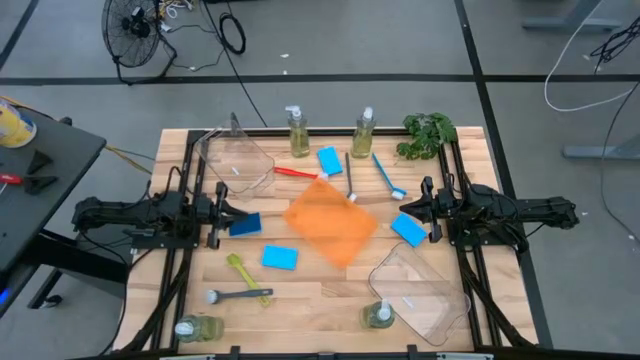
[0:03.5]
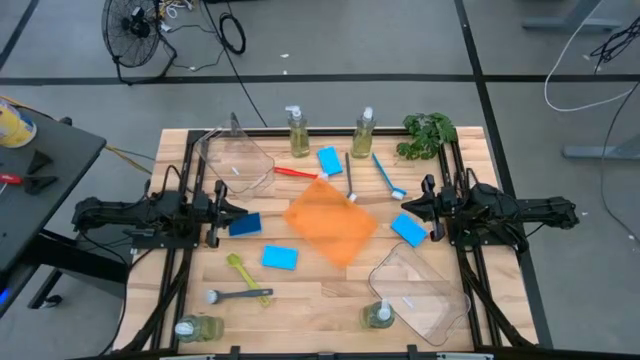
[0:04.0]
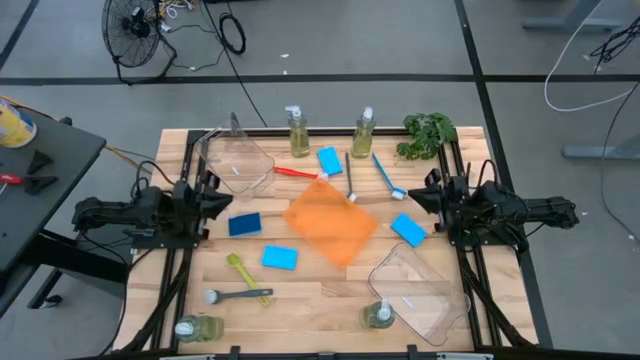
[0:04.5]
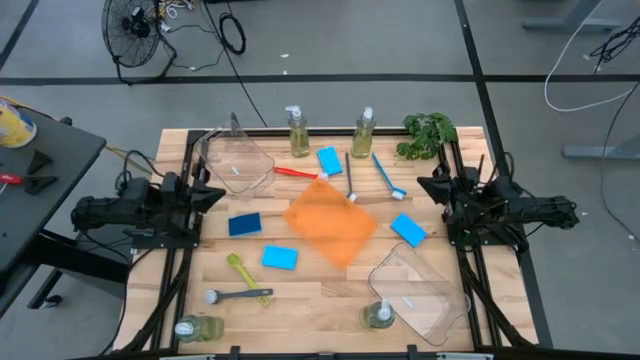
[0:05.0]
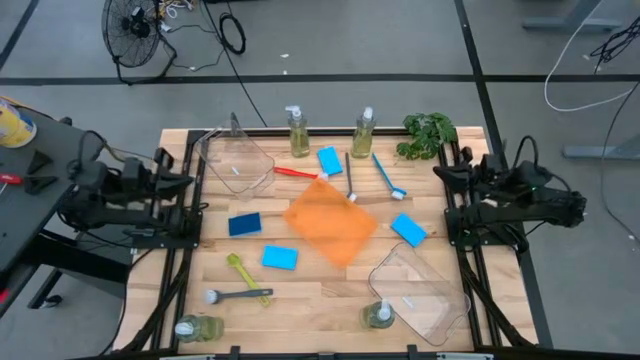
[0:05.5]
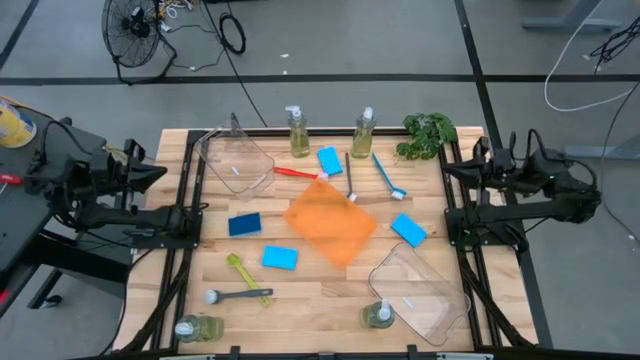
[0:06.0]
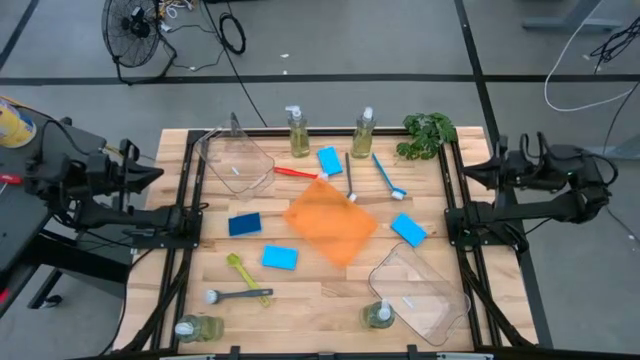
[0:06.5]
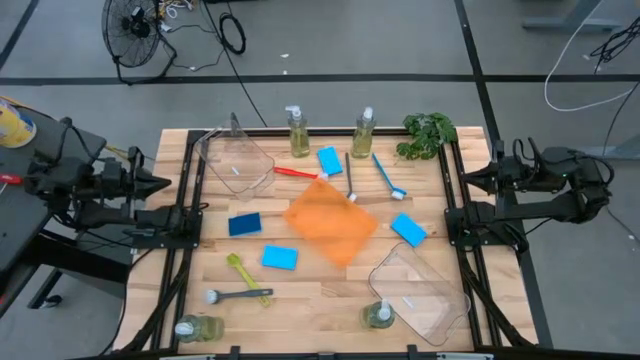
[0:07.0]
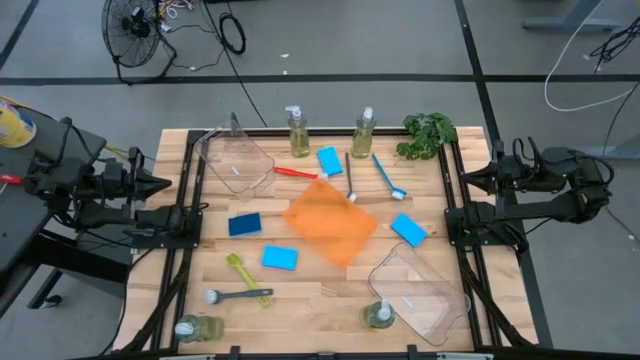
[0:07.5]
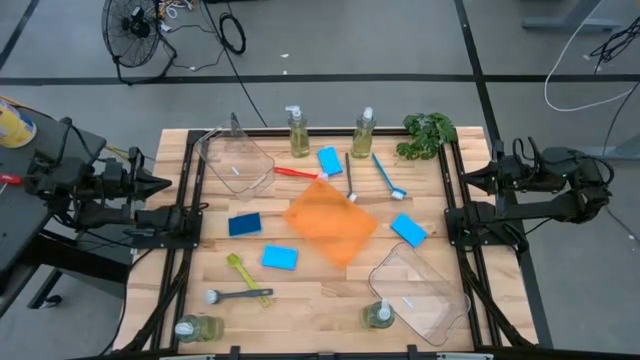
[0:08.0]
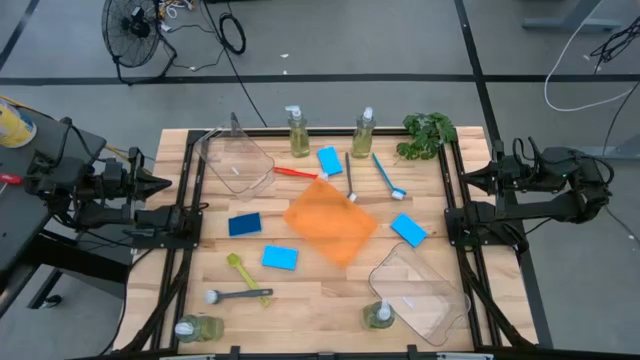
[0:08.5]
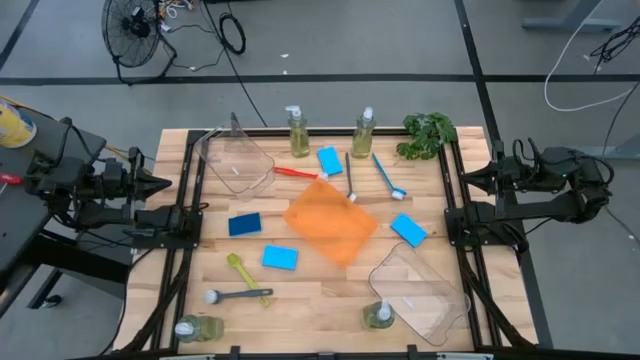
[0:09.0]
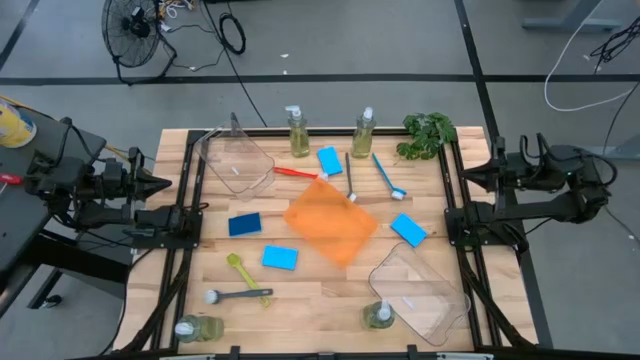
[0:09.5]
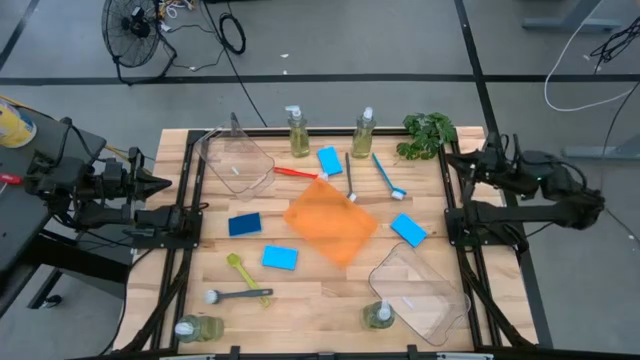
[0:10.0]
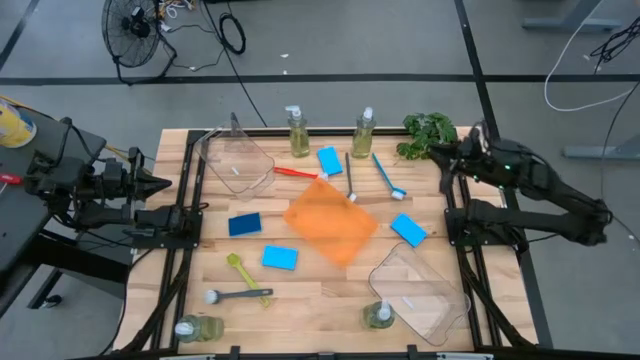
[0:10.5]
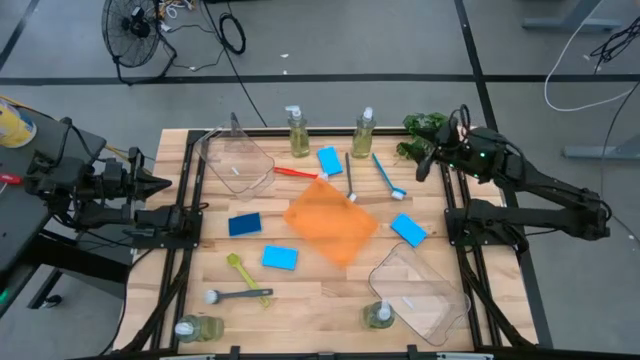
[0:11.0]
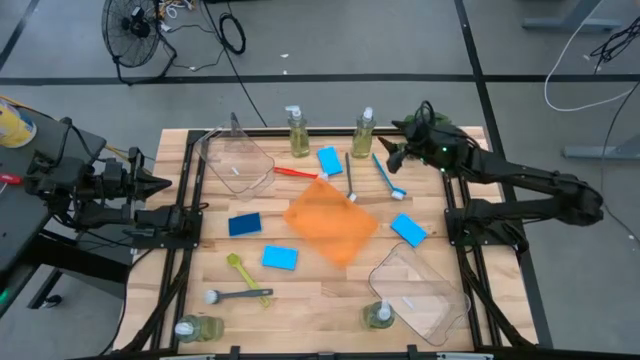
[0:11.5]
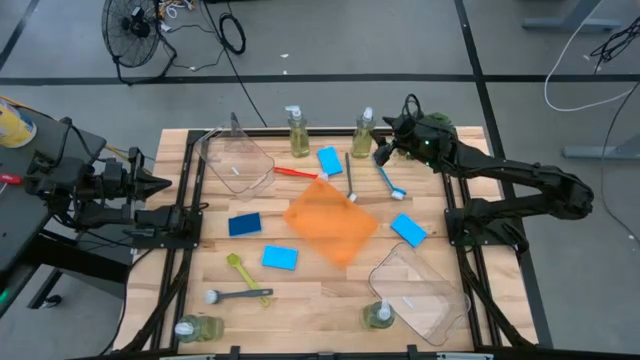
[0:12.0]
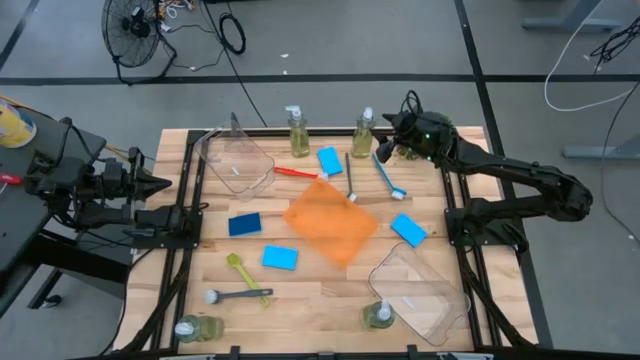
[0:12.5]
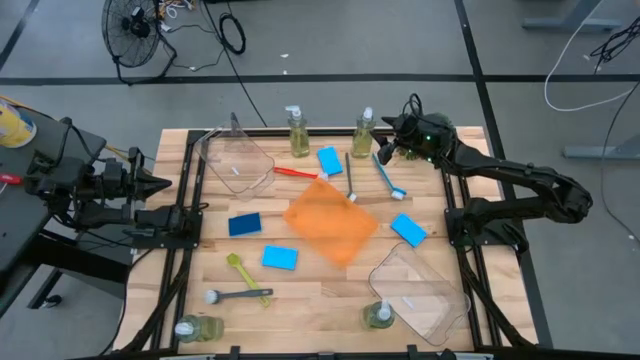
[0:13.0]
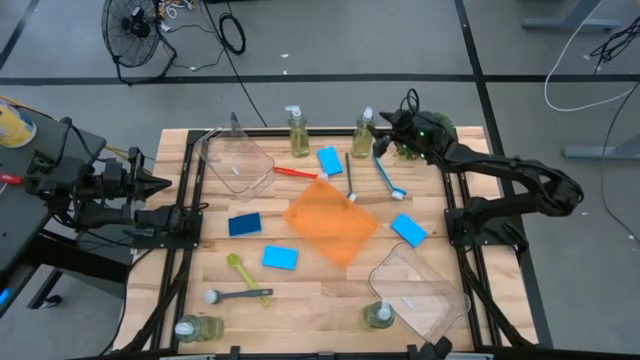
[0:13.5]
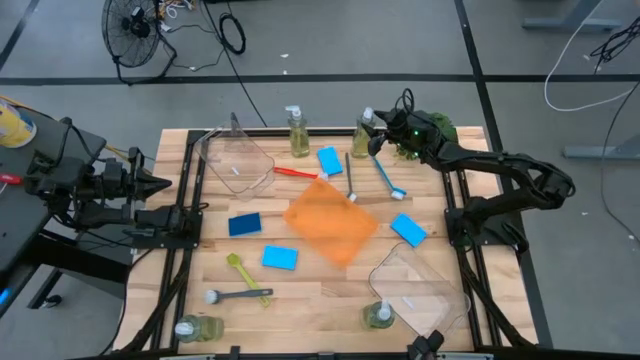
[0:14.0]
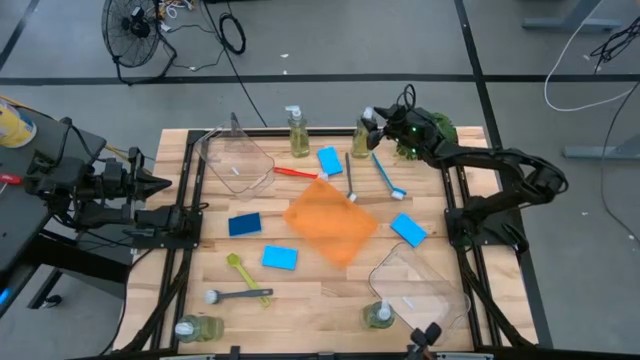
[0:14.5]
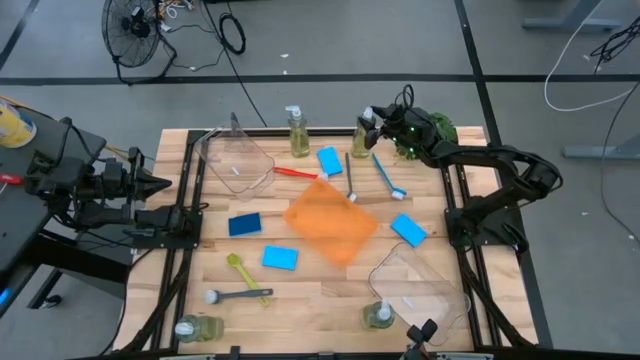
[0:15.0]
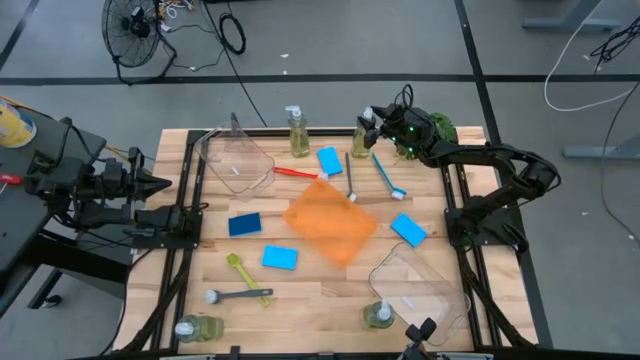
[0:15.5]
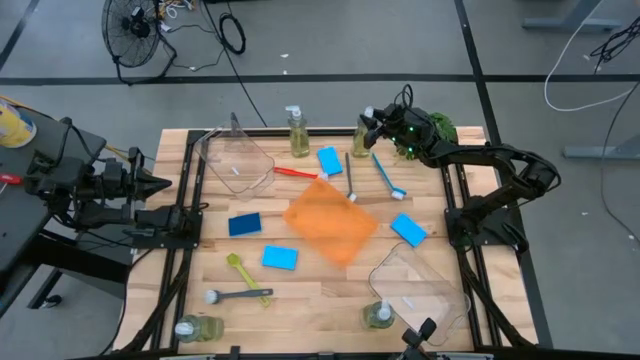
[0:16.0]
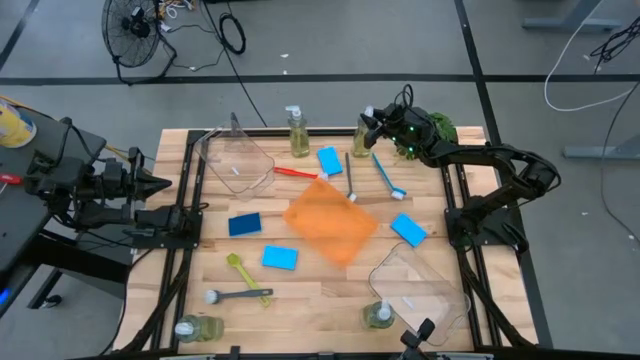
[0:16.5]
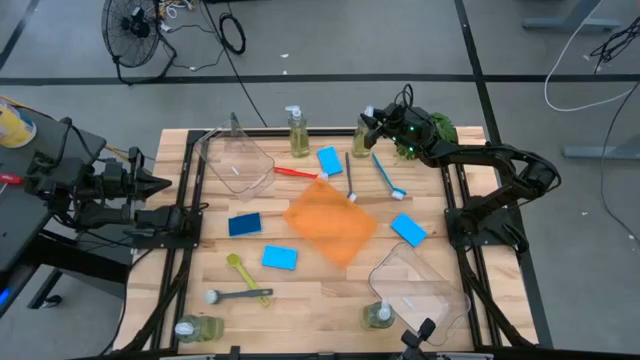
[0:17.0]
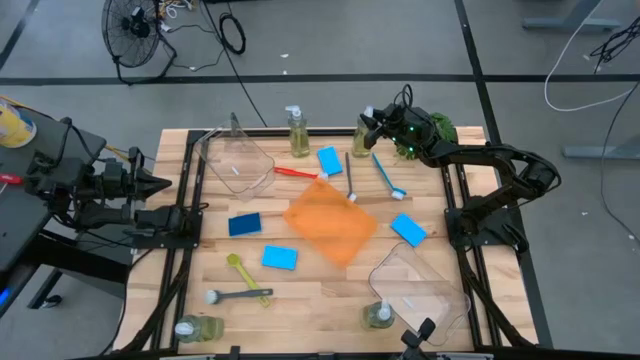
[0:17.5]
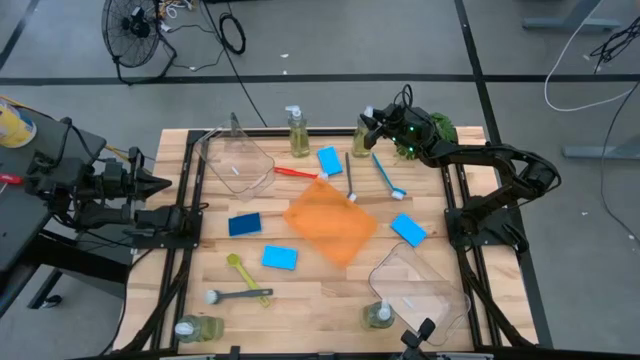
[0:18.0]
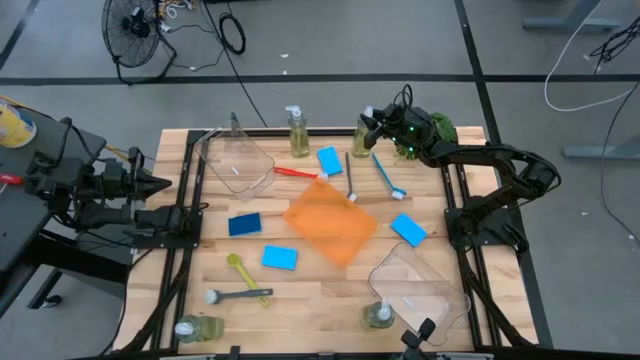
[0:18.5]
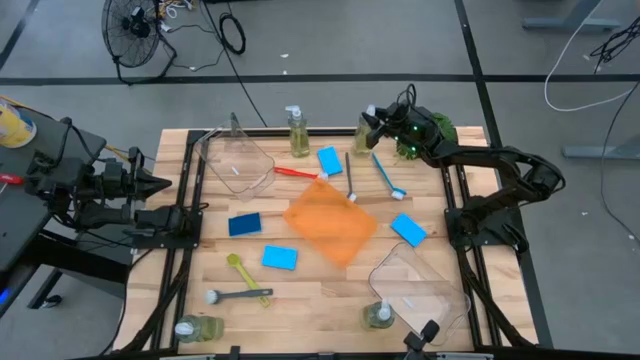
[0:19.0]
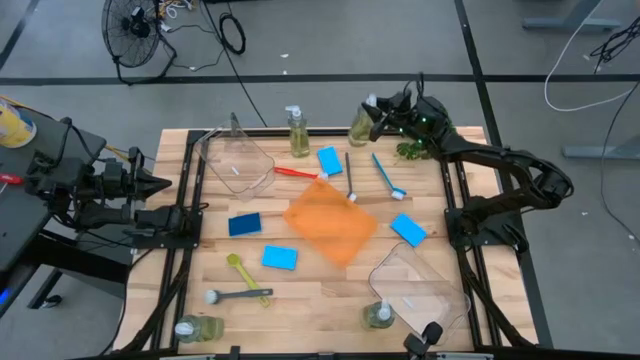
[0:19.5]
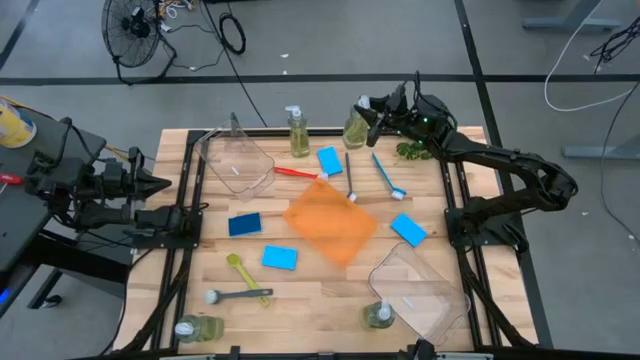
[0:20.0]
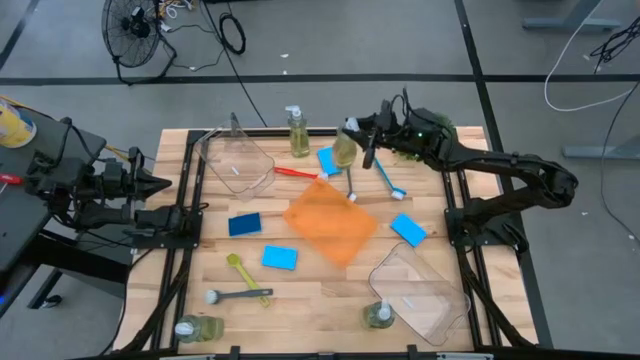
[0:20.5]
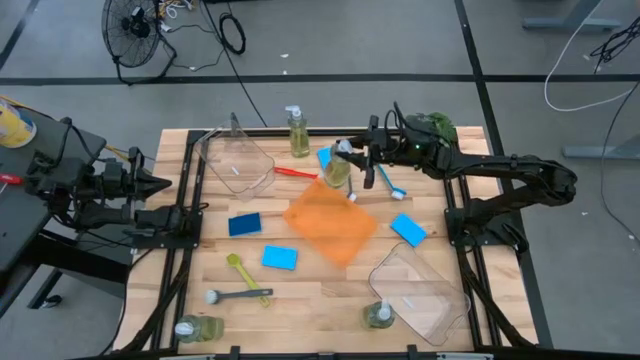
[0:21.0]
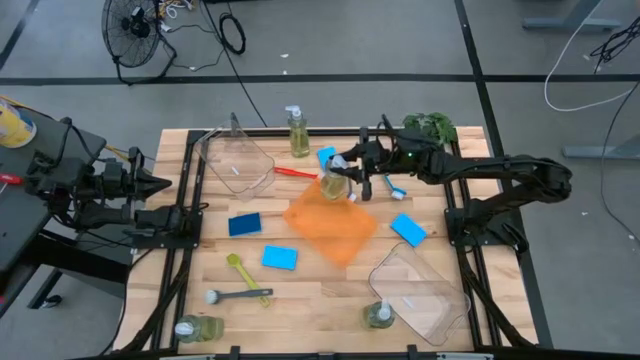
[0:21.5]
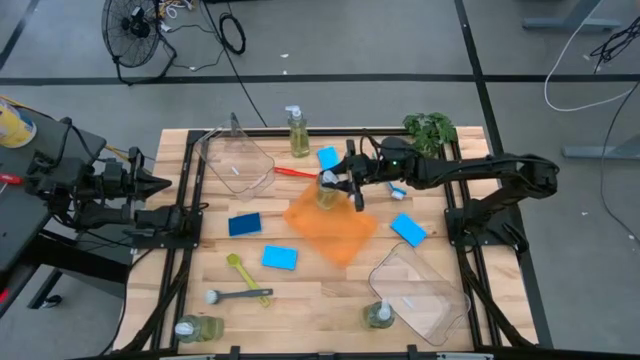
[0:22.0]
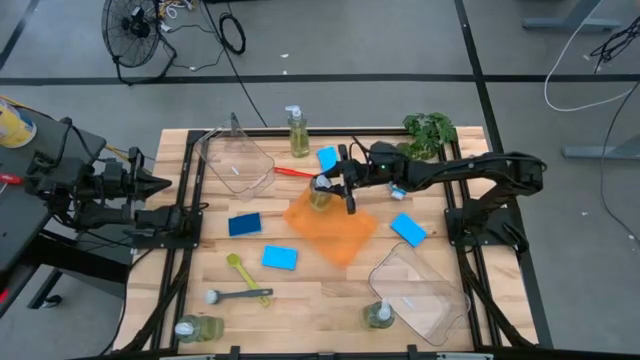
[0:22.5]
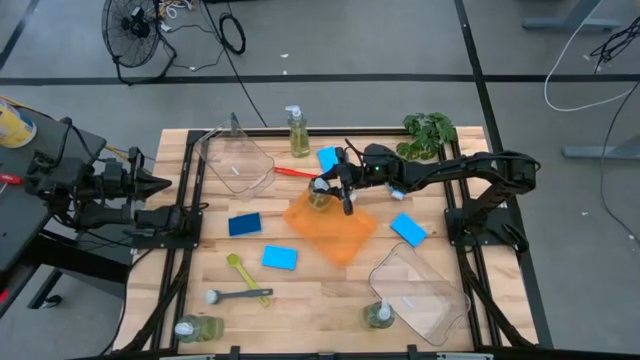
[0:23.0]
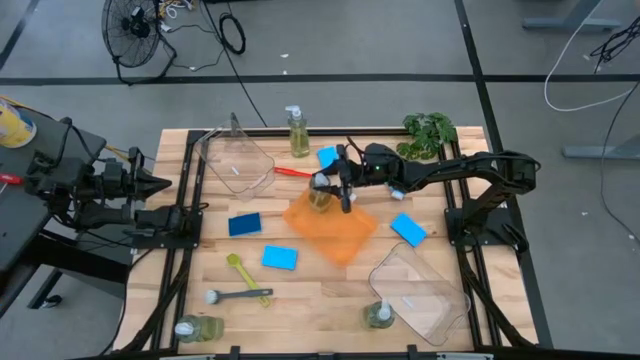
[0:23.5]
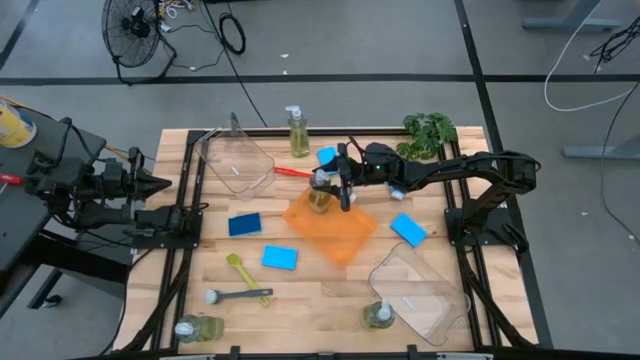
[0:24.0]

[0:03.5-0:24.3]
Task: Pick & Place Kitchen Sink Supplies
Put the yellow dish soap into the orange bin
